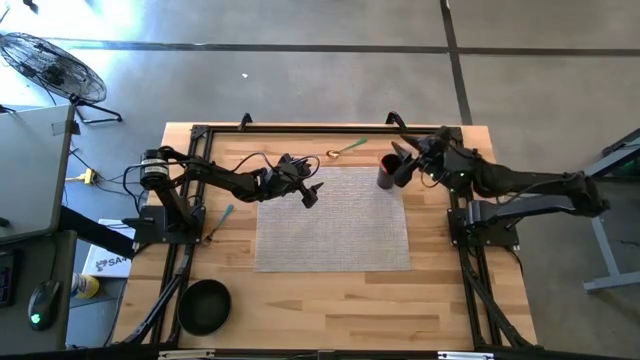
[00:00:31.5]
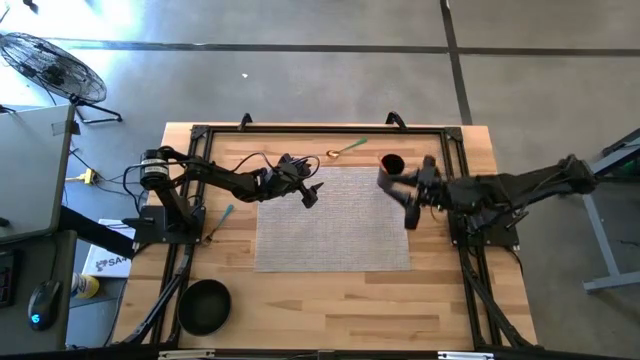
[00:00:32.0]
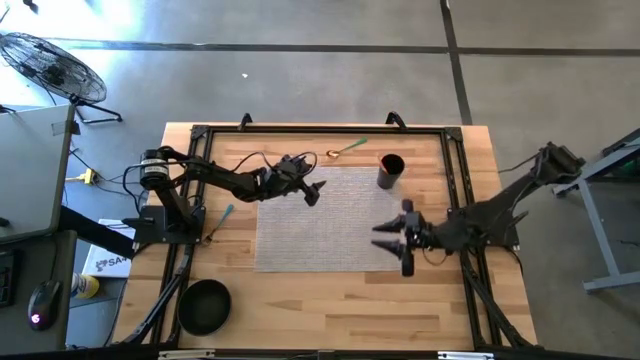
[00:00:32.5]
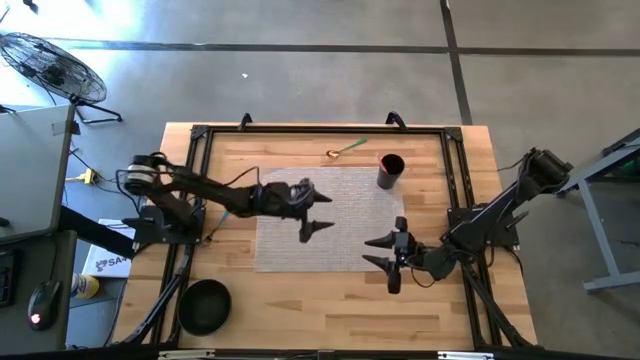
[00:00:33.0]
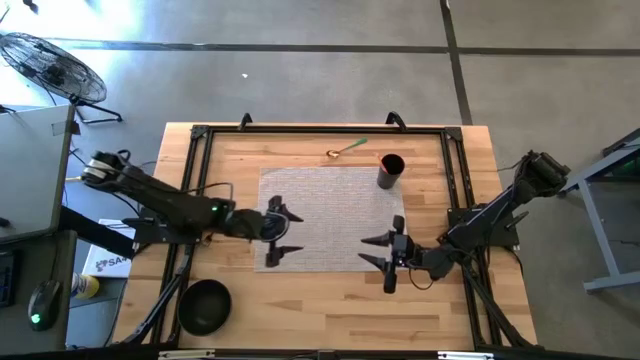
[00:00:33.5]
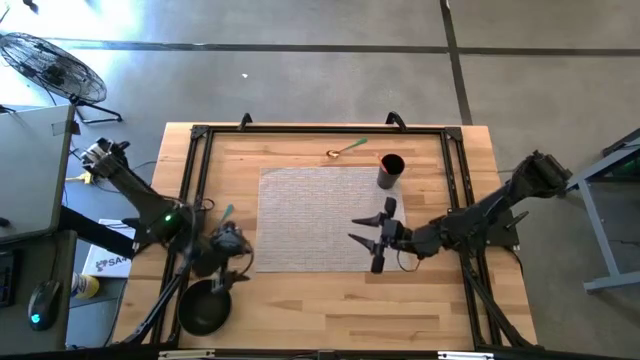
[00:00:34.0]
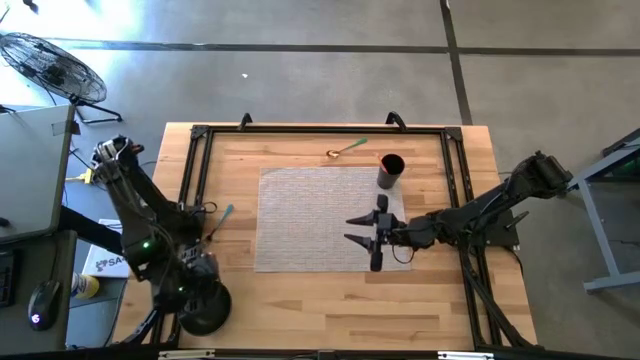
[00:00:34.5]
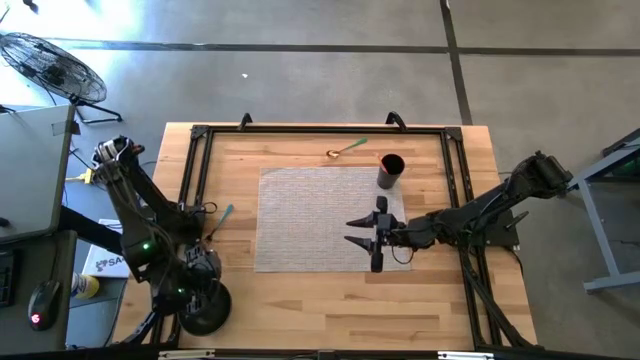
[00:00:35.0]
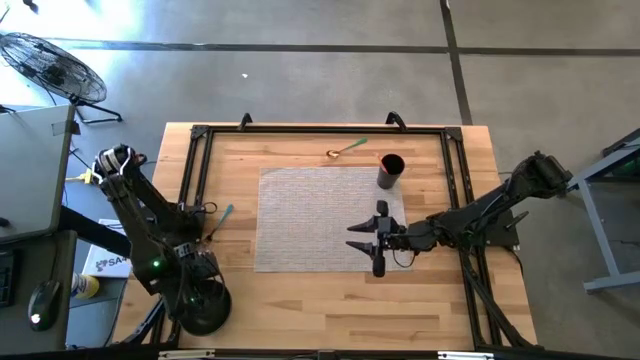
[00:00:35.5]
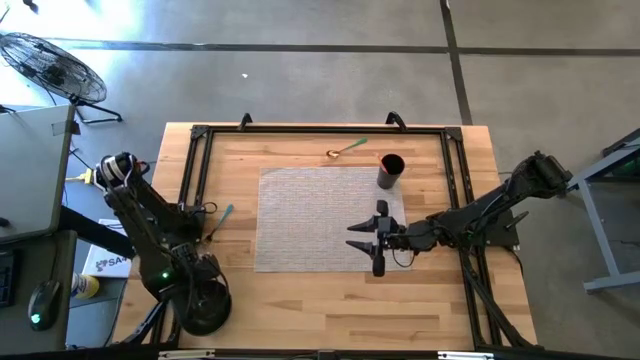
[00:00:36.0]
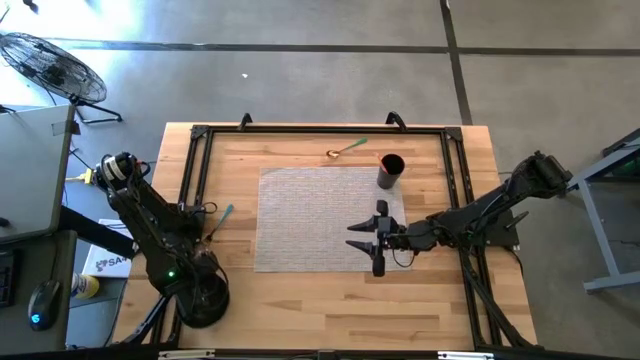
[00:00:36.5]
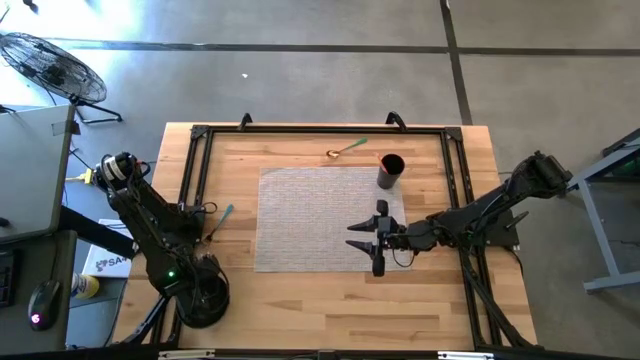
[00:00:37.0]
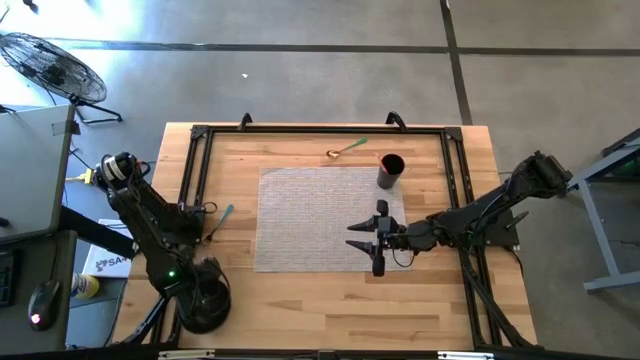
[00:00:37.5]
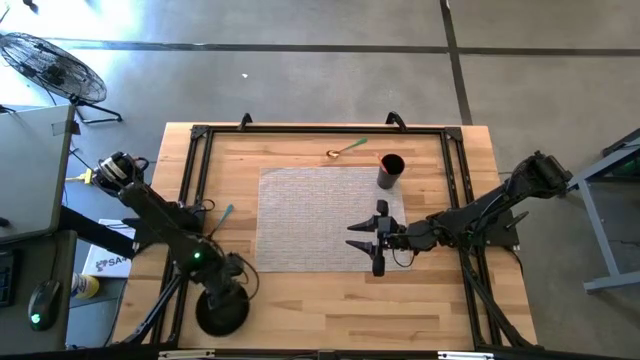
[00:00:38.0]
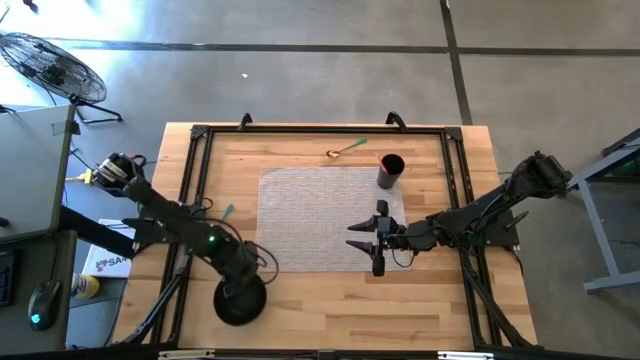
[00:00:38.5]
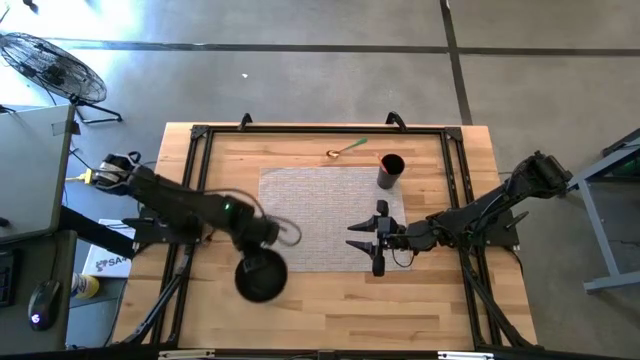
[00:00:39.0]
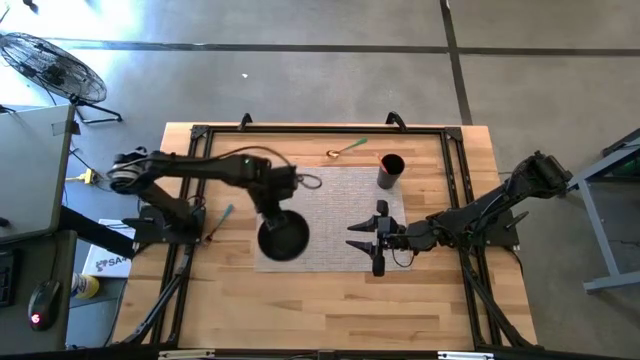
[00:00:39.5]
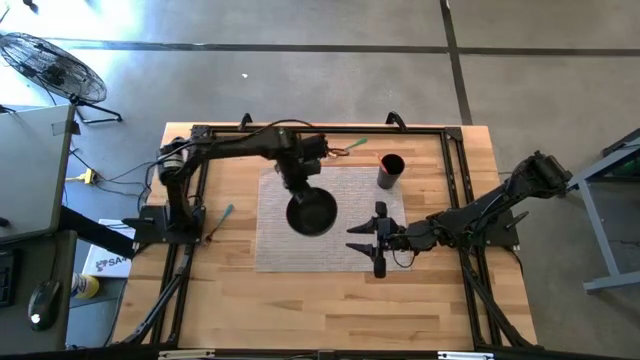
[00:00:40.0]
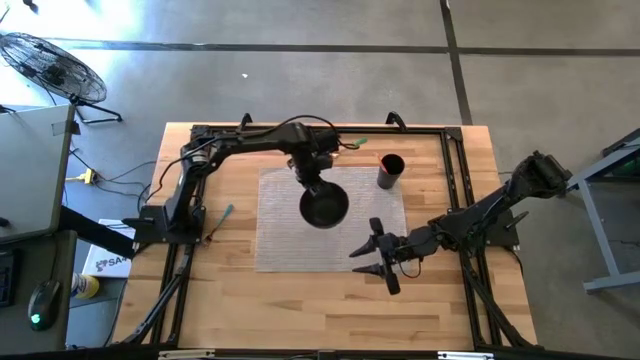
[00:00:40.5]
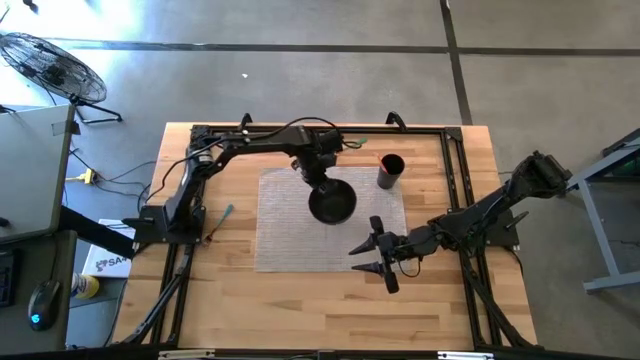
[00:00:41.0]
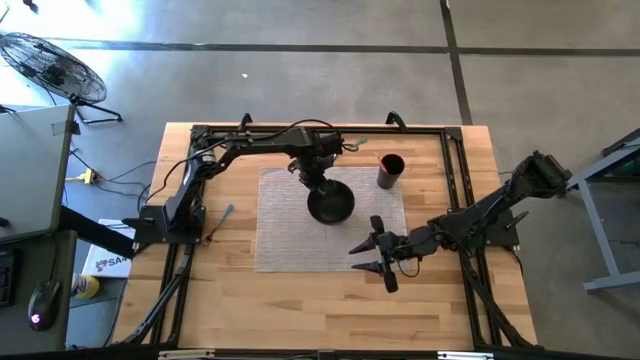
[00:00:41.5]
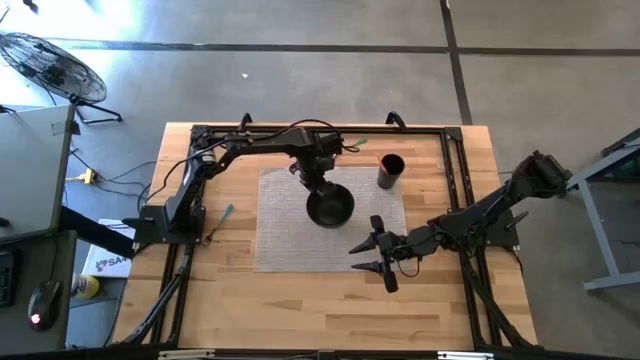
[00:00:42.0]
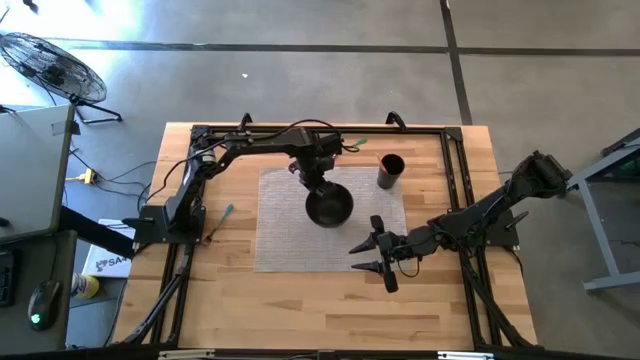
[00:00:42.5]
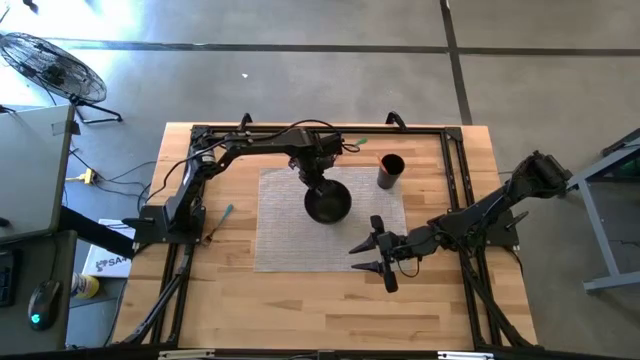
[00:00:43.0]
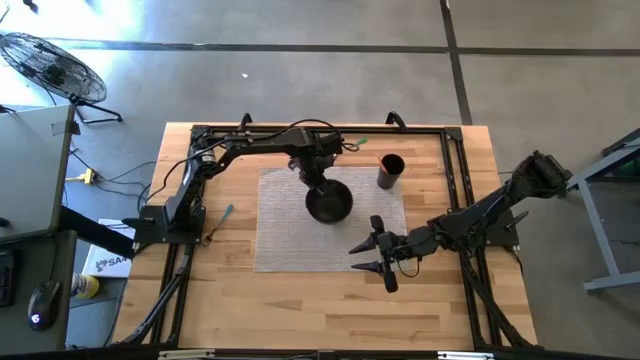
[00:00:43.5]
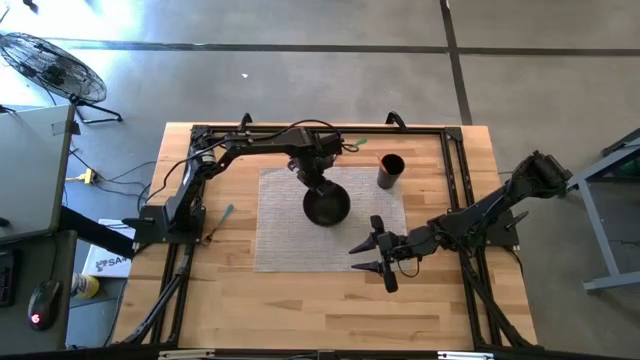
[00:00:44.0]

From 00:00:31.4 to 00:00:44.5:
Task: Pick & Place Utensil
Put the black bowl on the gray mat

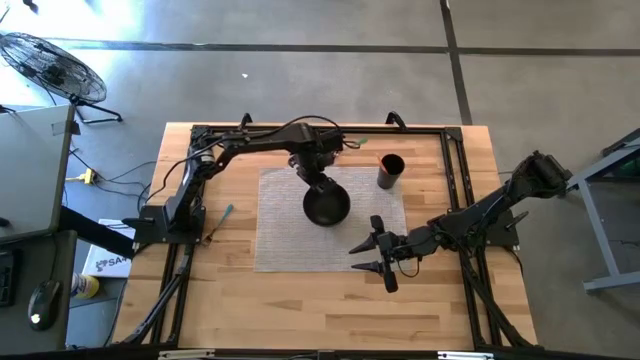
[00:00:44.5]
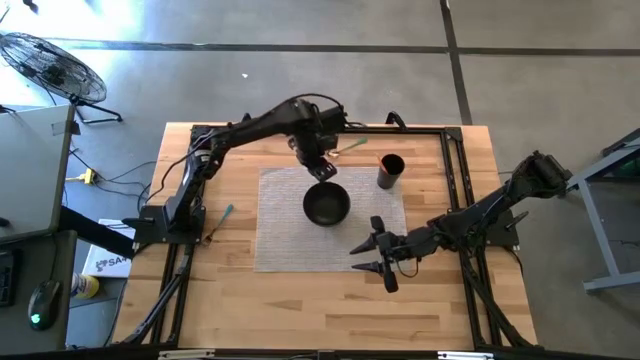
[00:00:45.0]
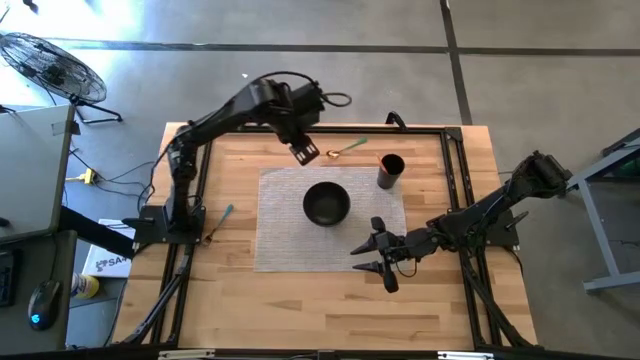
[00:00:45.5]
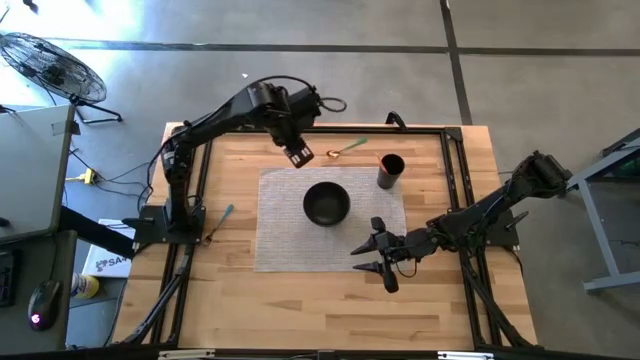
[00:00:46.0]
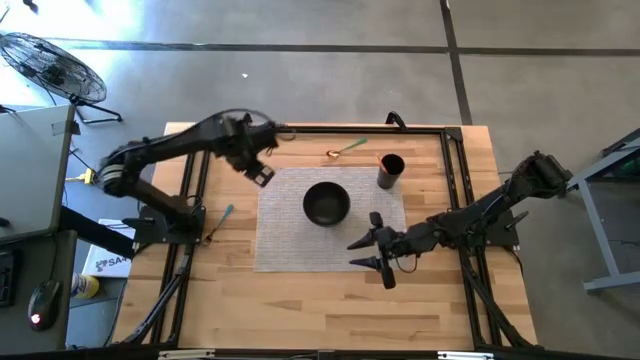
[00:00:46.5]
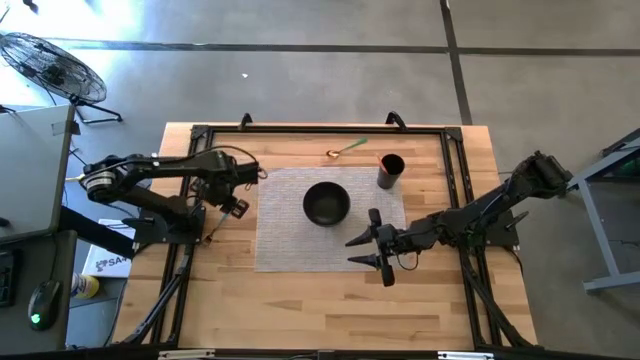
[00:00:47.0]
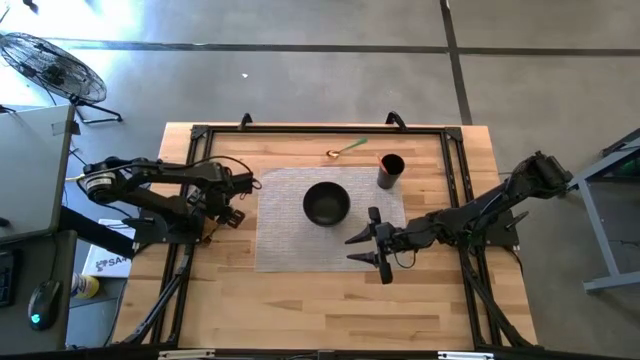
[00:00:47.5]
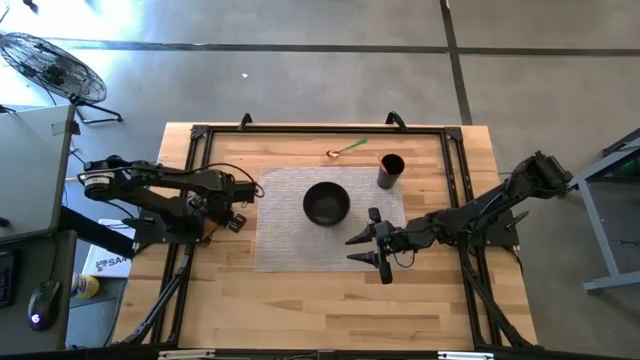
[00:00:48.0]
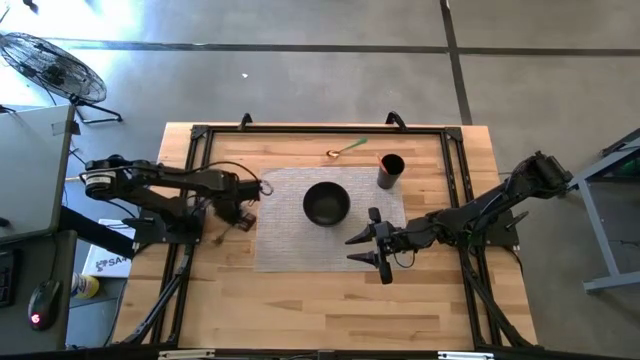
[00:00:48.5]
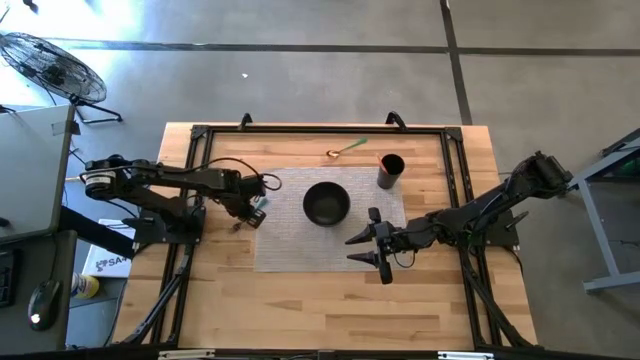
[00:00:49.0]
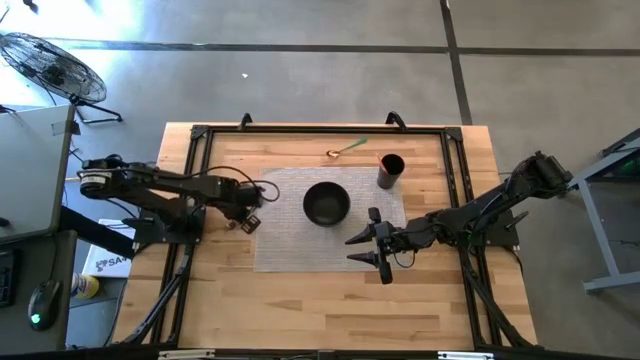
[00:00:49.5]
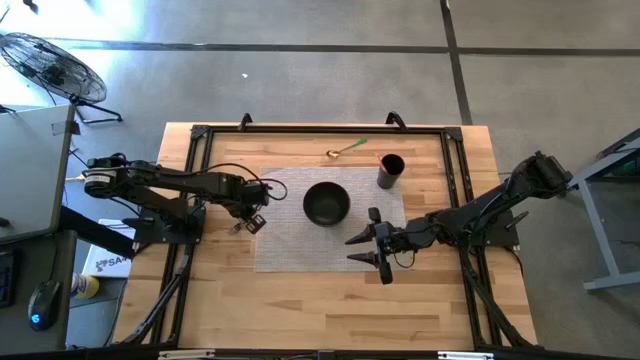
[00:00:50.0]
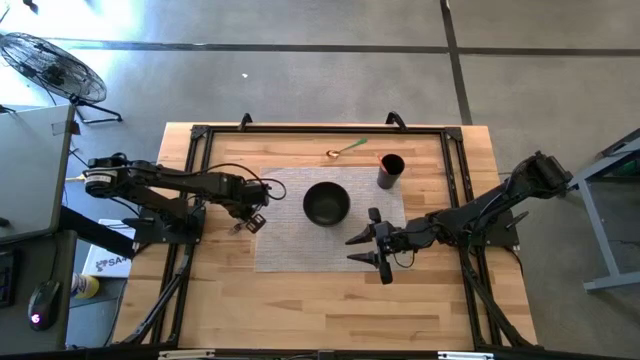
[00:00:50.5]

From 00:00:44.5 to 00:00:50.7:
Put the blue fork into the black bowl

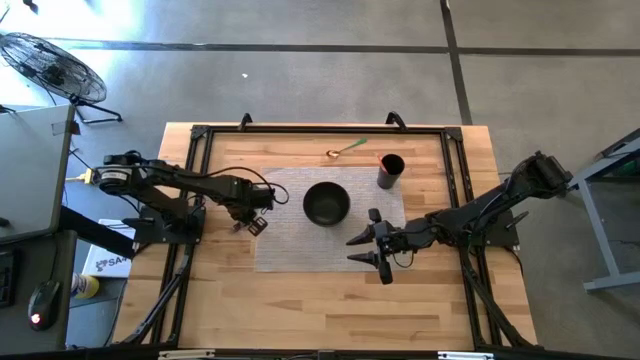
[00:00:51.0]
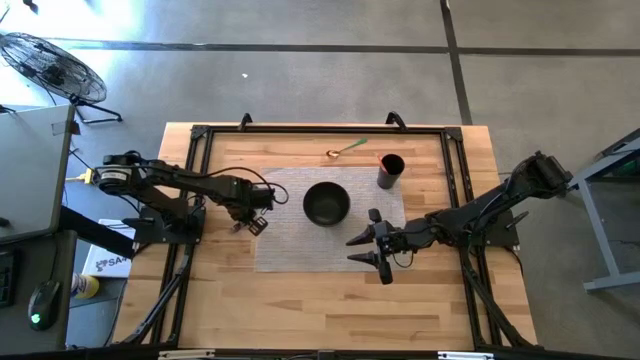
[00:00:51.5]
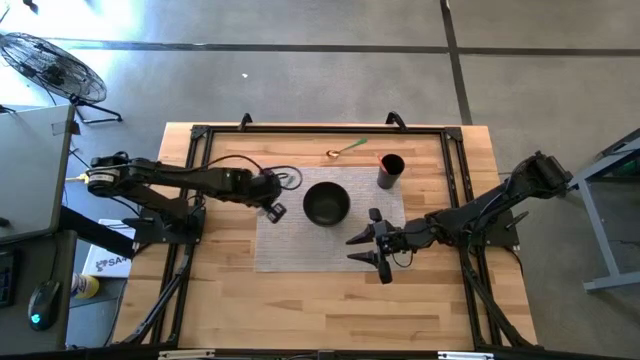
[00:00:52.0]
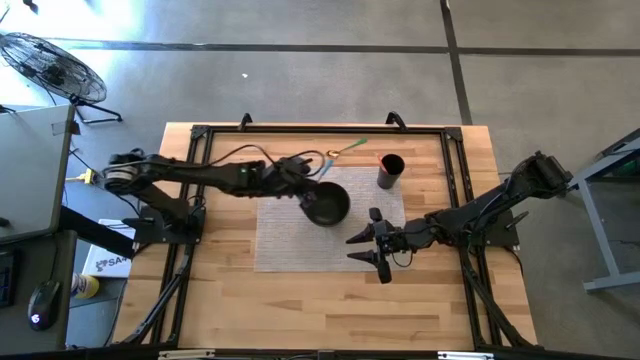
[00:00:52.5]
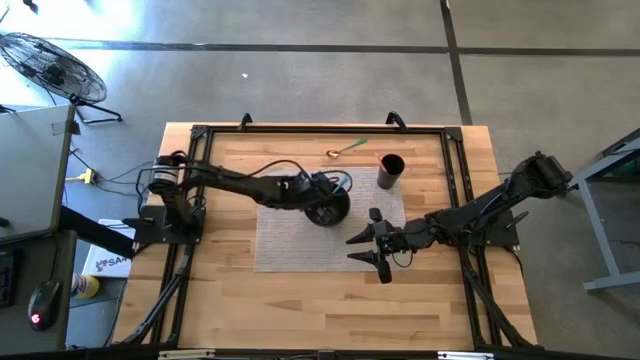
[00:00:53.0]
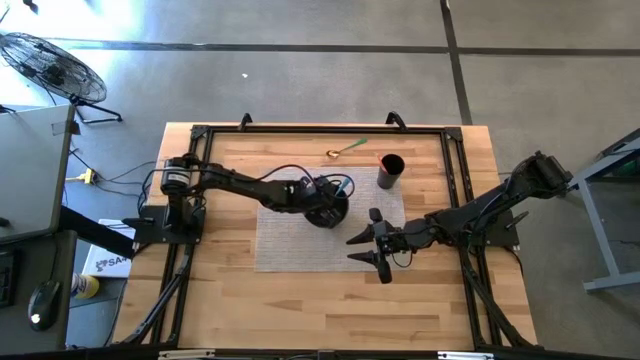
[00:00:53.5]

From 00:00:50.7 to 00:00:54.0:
Put the blue fork into the black bowl
